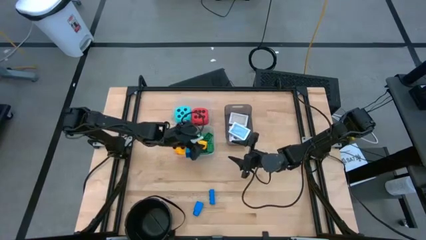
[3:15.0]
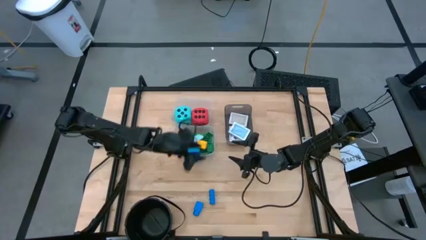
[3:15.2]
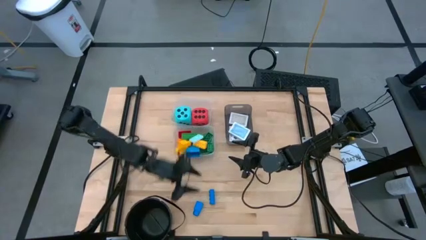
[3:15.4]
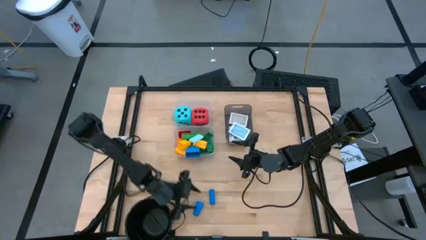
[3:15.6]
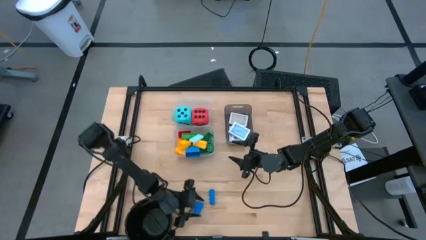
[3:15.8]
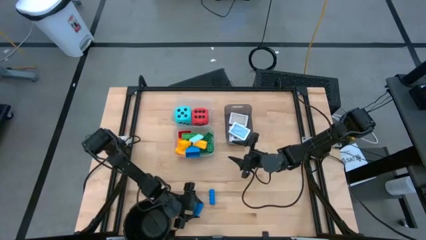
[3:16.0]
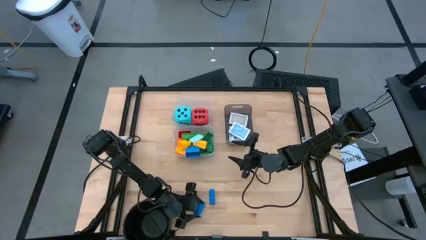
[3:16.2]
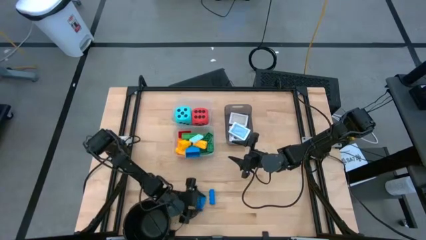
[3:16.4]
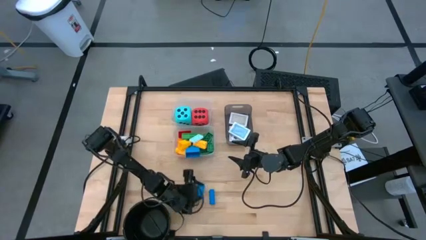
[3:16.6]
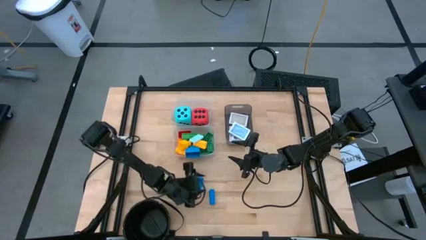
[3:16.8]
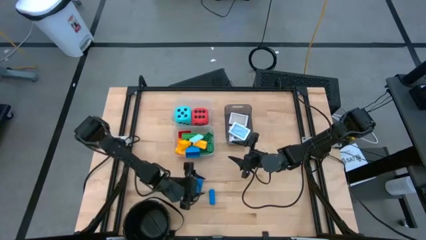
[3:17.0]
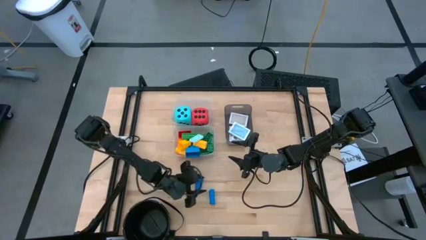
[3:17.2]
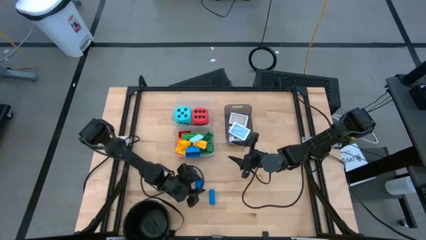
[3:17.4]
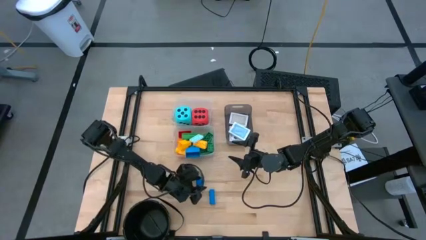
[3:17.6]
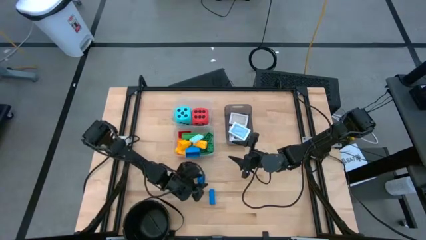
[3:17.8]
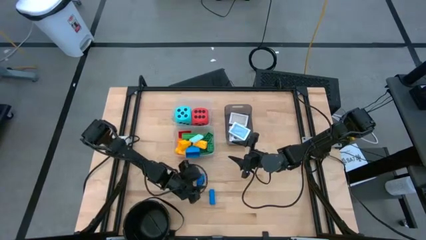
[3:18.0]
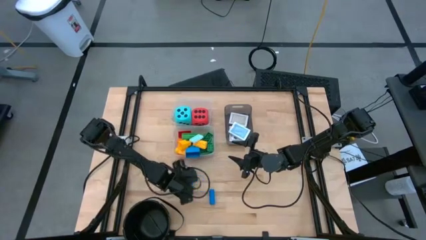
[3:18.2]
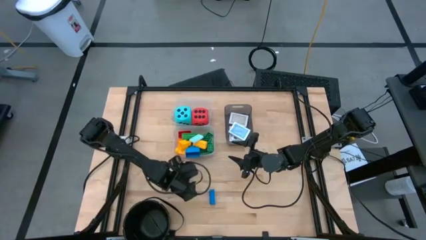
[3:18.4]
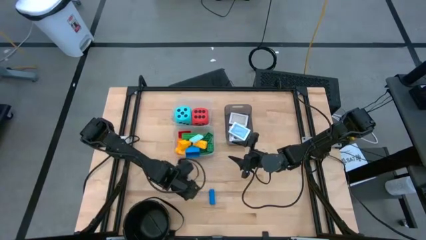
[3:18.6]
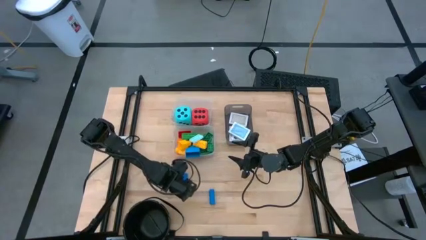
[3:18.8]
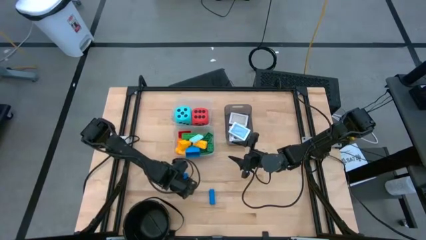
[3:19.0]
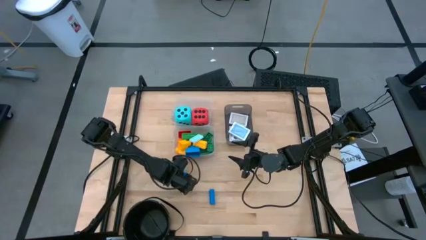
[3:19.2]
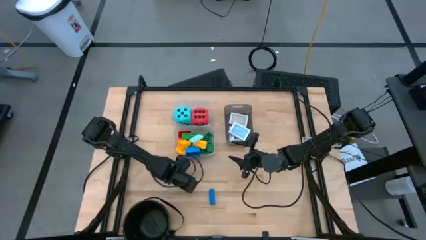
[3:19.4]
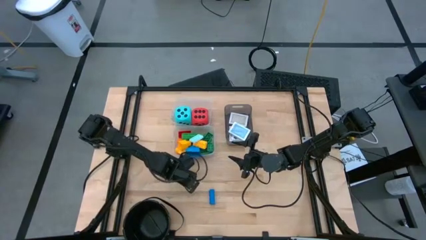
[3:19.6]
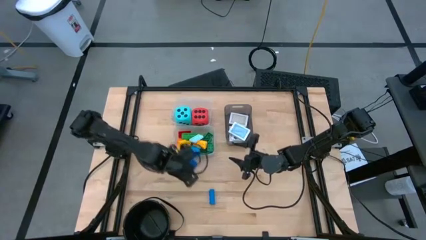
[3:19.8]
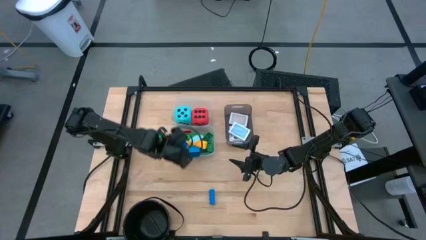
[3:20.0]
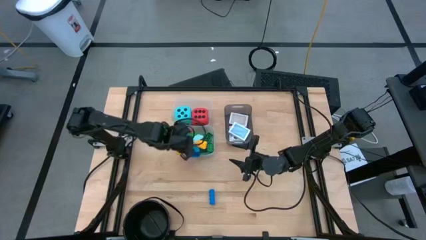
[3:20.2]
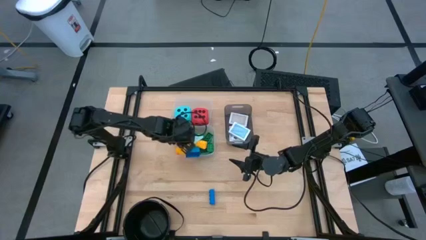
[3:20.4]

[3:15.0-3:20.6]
Task: Pick & Place Toys
Put the blue game piece into the bottom transparent bin

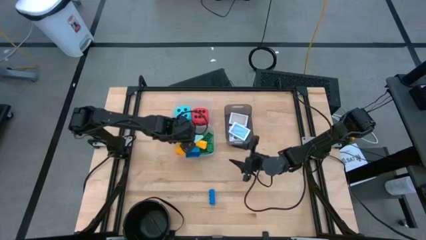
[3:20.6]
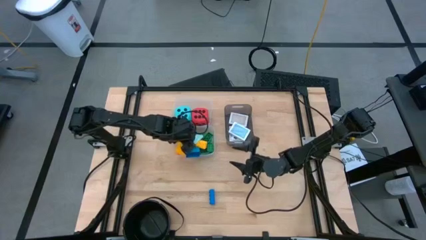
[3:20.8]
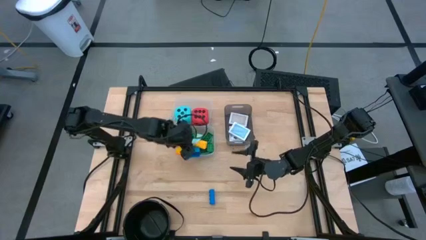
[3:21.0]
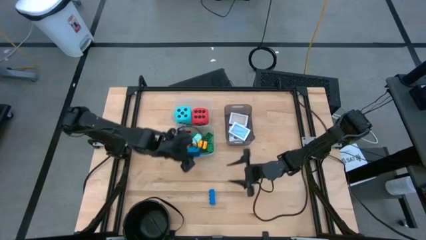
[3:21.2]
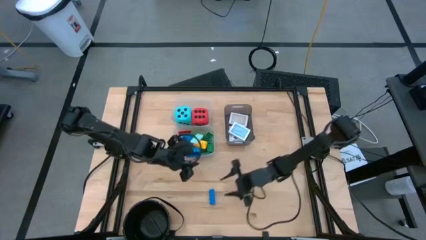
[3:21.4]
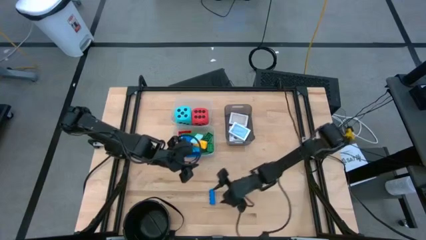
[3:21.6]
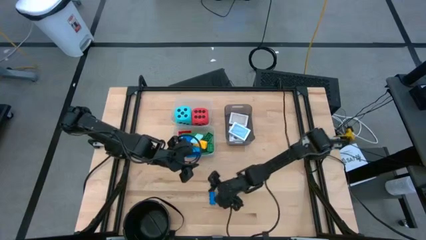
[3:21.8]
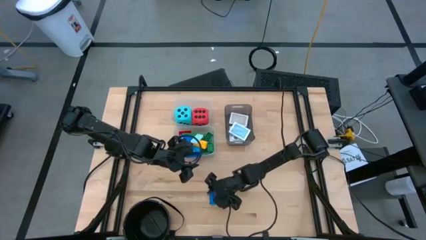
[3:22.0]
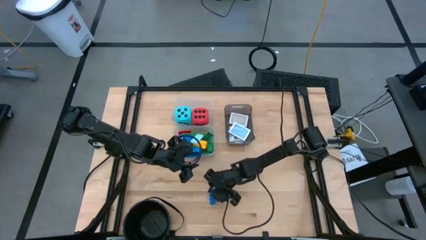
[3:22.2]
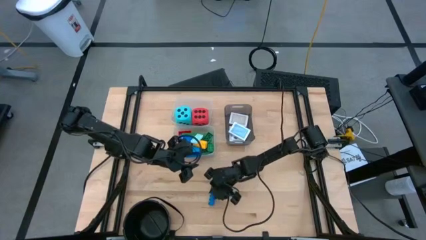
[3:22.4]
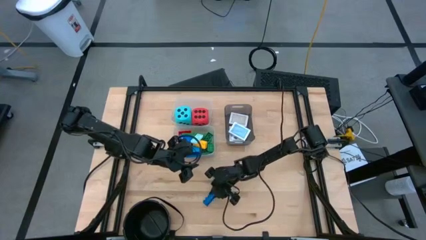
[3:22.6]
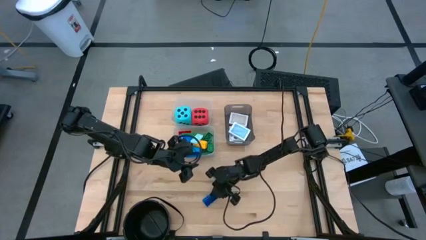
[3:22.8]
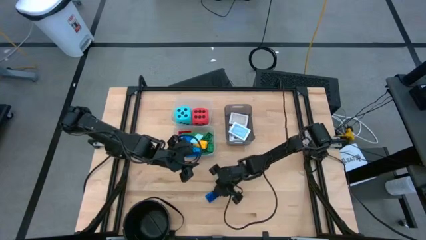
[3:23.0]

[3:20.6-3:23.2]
Put the blue game piece into the bottom transparent bin

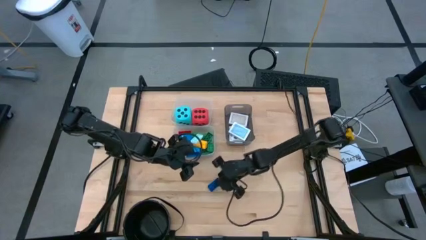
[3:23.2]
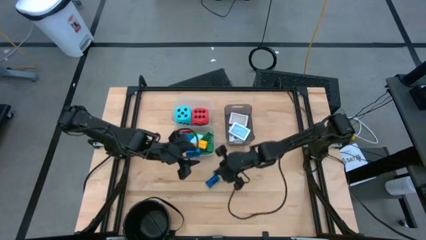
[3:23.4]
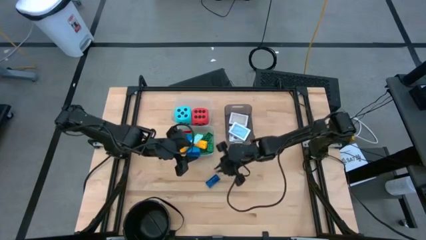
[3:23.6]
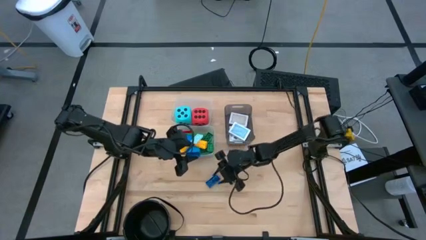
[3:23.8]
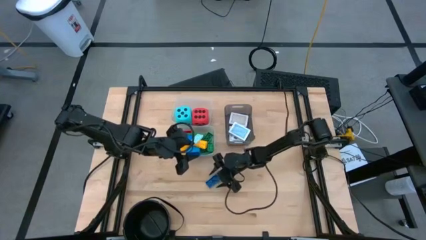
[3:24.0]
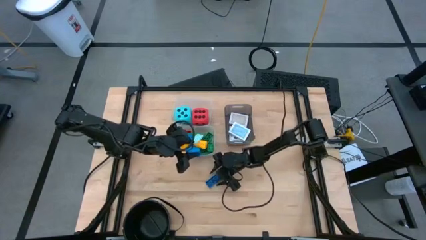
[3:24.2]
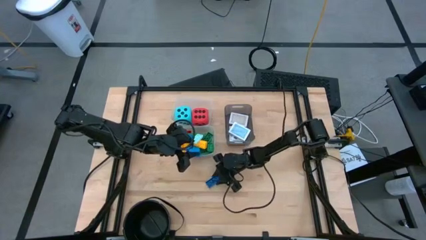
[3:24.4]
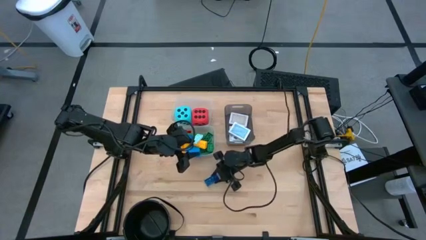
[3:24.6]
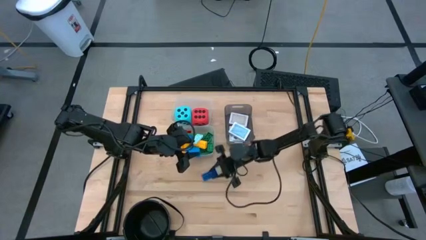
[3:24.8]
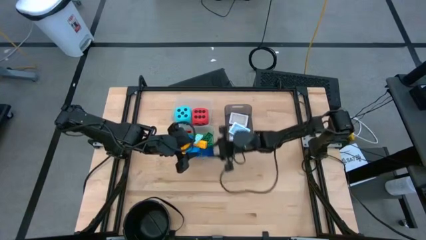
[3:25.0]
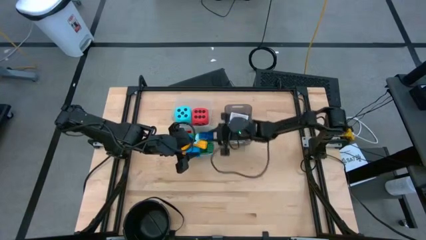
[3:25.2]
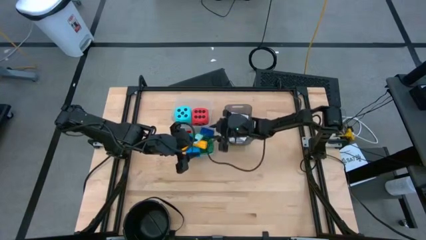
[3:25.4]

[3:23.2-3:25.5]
Put the blue game piece into the bottom transparent bin

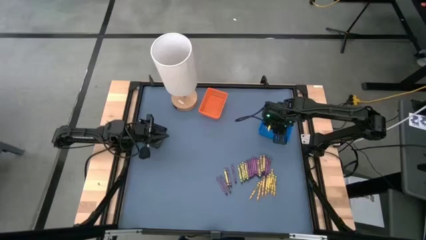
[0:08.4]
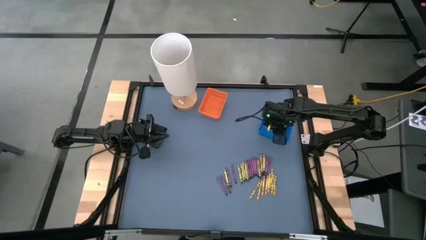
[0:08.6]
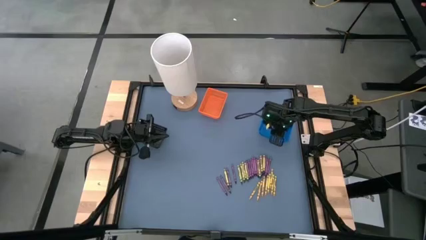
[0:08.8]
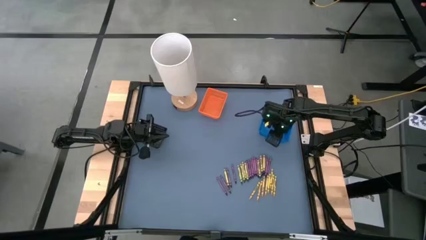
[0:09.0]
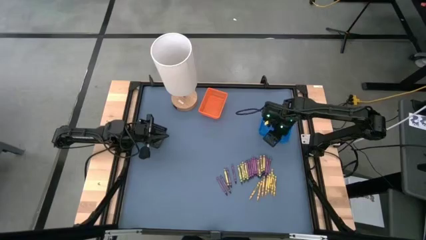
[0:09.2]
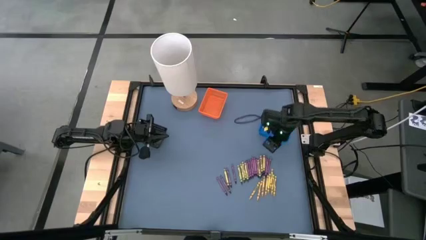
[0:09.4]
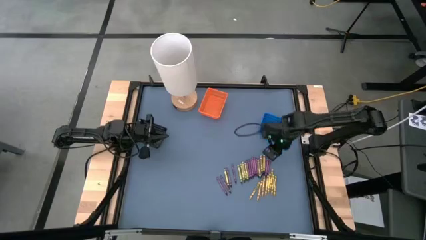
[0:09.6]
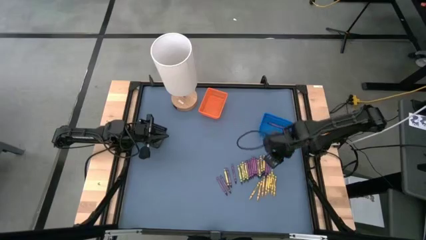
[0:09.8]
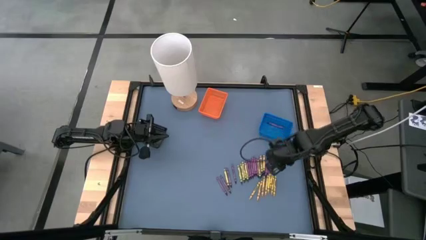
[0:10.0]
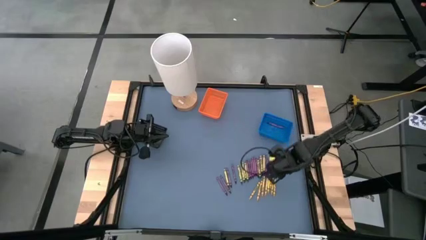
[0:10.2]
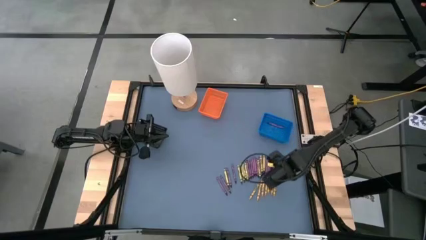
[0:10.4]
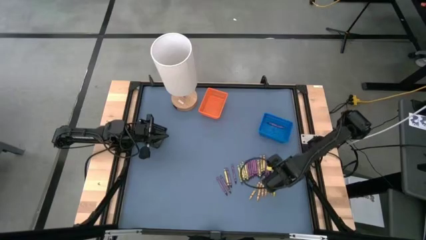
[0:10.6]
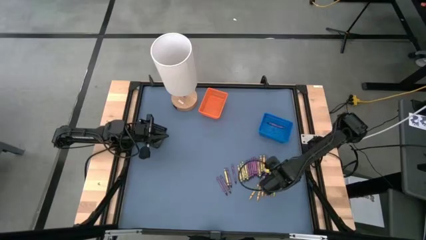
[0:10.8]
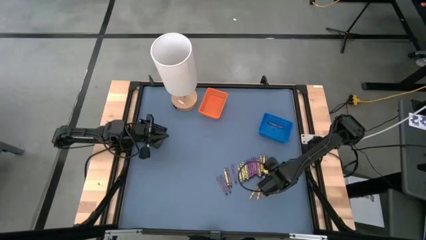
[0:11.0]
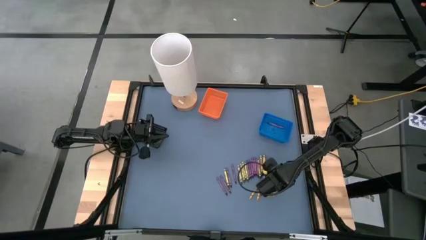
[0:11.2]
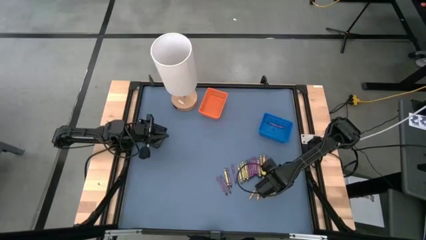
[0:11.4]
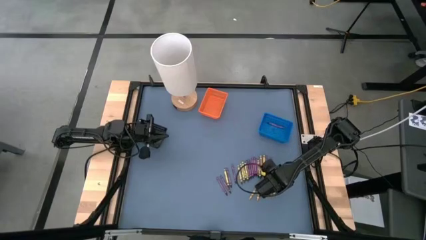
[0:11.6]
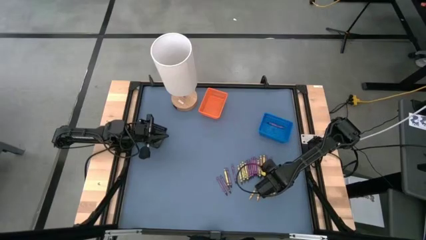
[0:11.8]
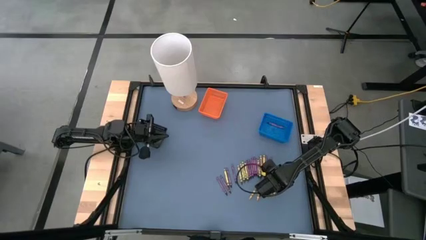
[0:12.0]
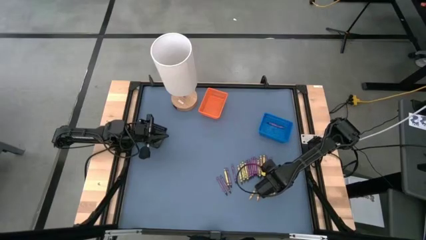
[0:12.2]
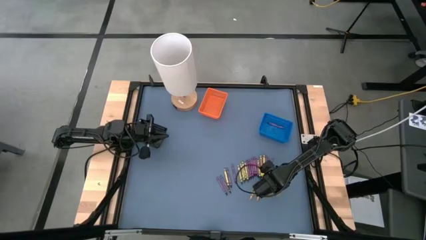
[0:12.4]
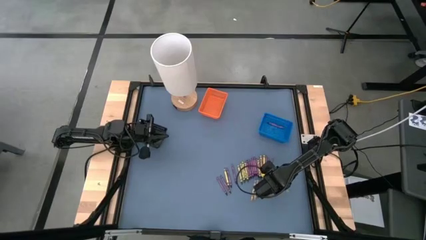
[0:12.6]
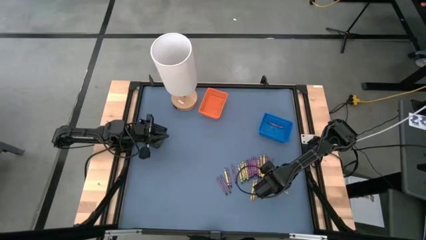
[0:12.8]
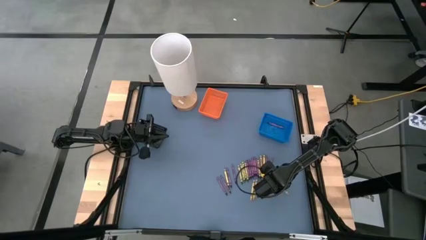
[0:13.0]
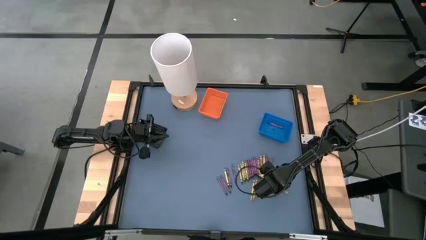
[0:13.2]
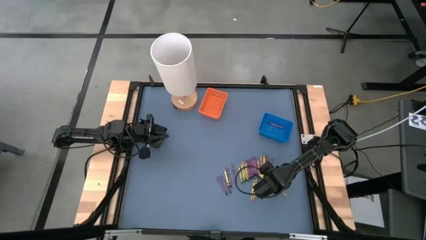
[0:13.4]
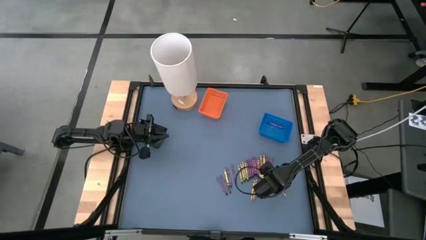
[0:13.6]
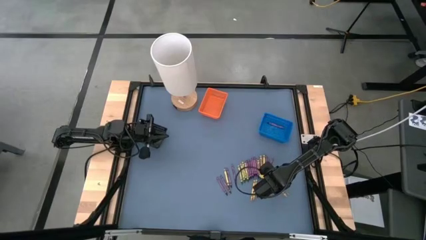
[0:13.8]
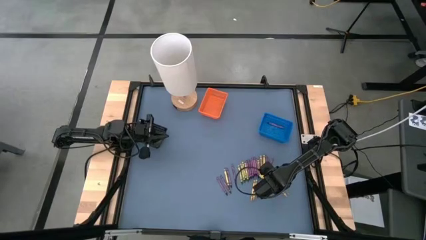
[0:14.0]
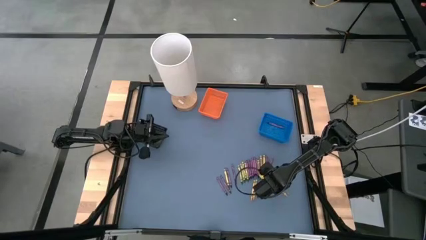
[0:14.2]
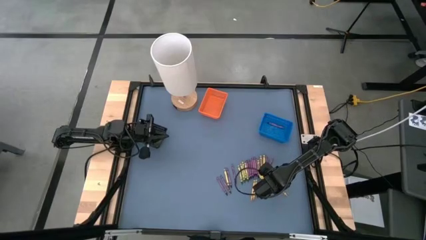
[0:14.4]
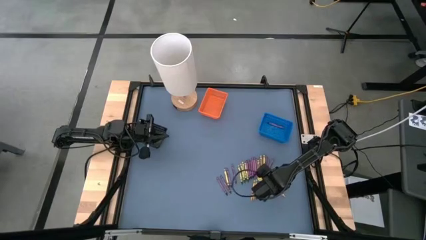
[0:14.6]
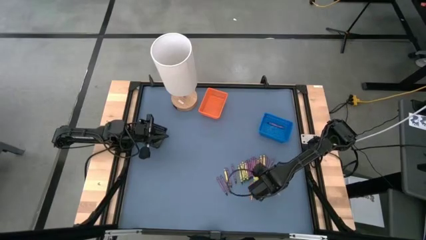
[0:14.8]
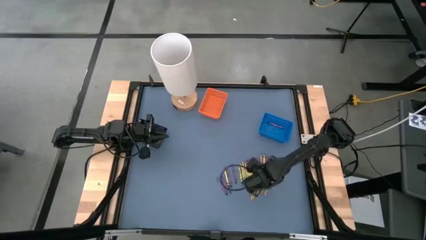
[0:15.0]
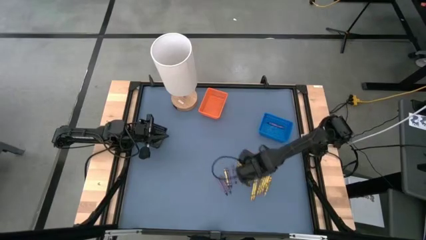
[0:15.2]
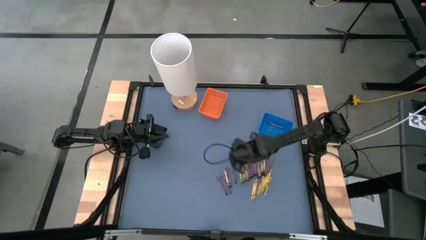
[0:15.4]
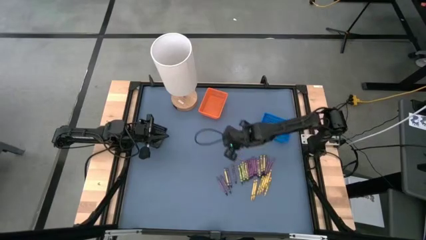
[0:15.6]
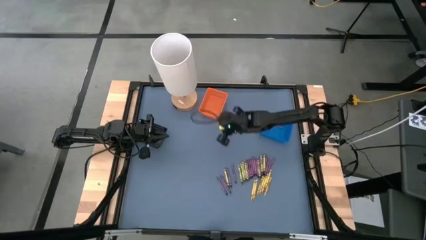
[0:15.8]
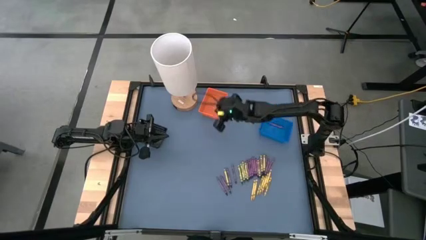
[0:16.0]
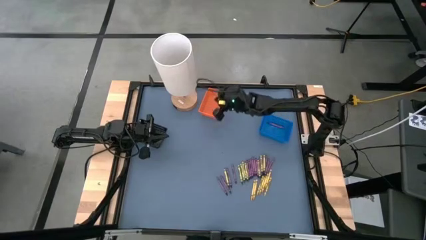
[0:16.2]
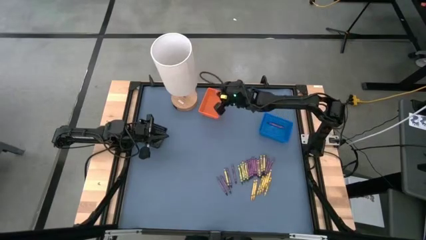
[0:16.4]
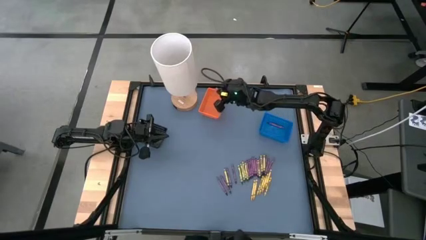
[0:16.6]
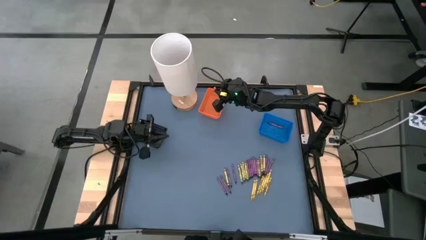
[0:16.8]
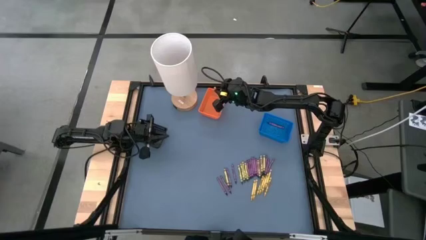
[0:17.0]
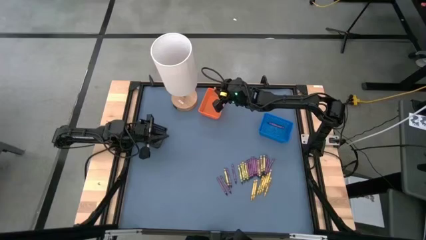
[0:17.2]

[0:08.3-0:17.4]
Task: Sort crayons
Put the yellow crayon into the orange basket
